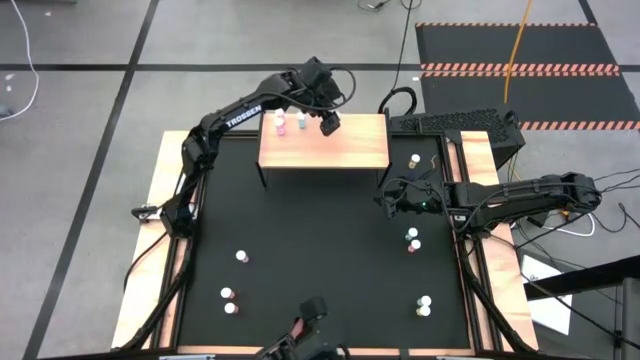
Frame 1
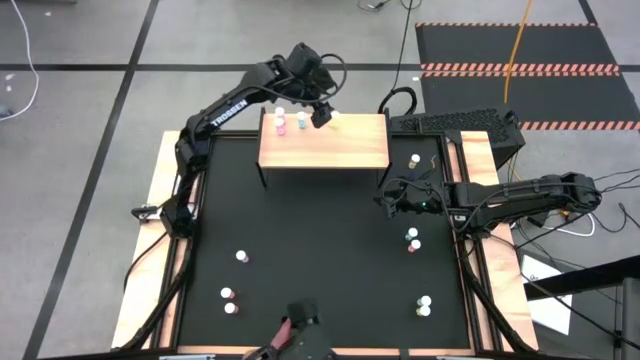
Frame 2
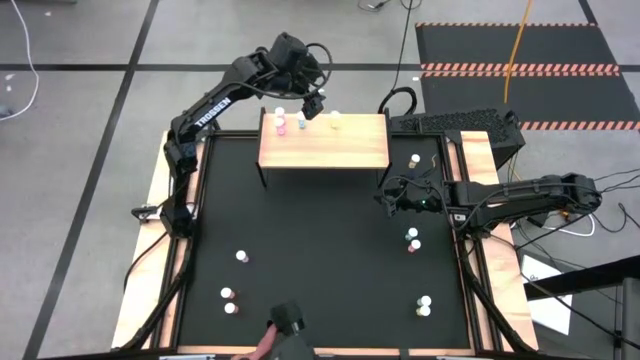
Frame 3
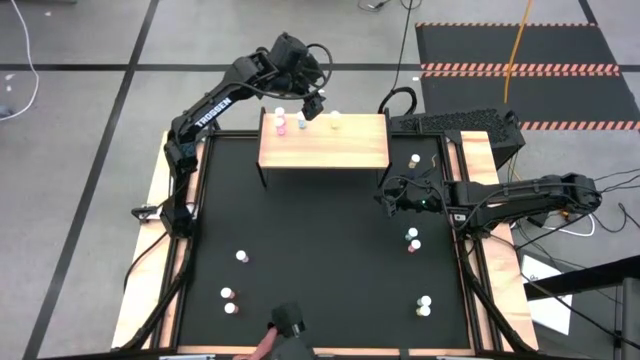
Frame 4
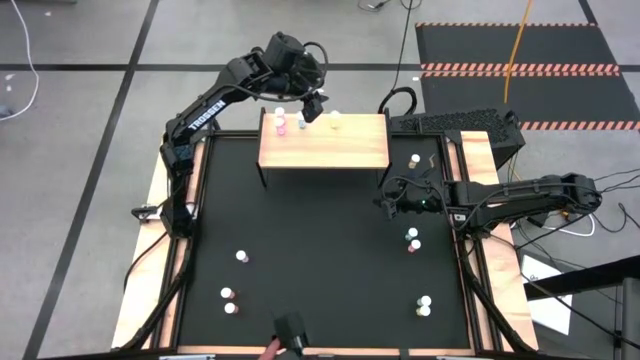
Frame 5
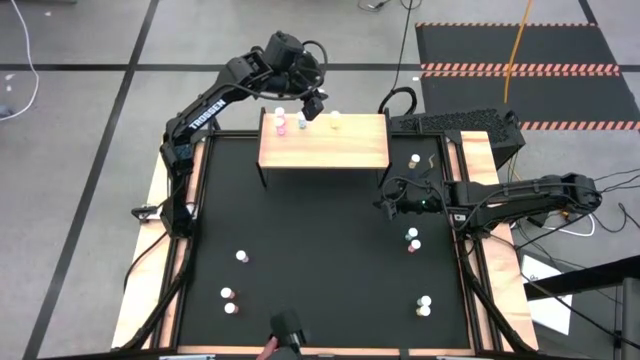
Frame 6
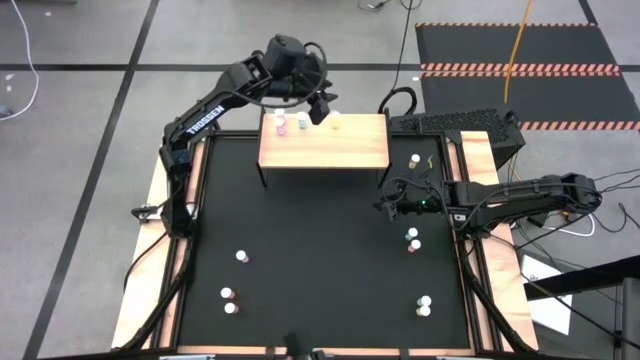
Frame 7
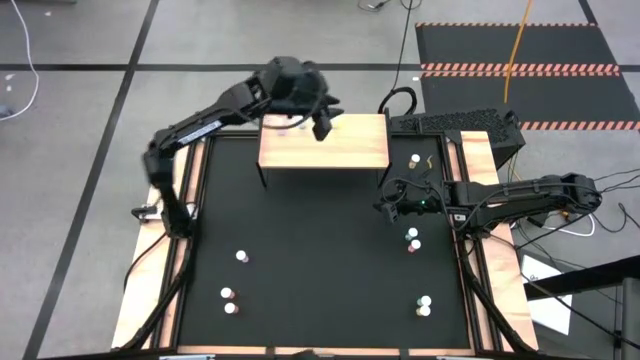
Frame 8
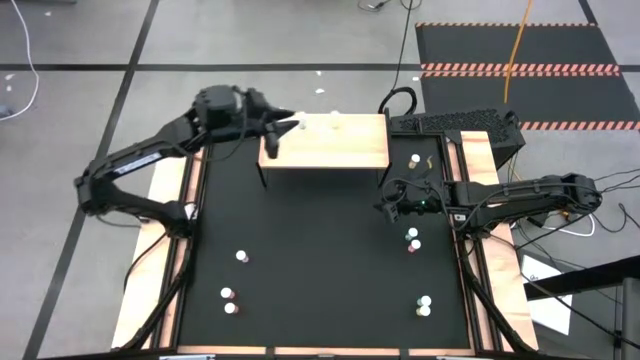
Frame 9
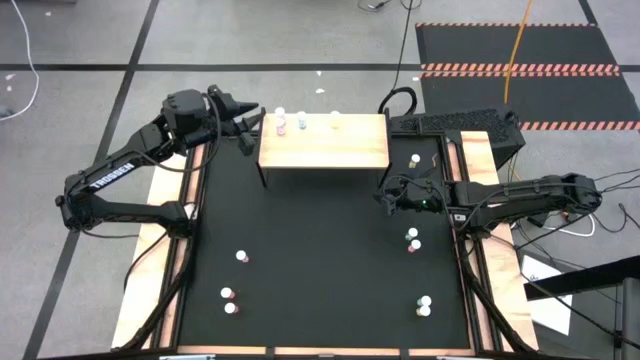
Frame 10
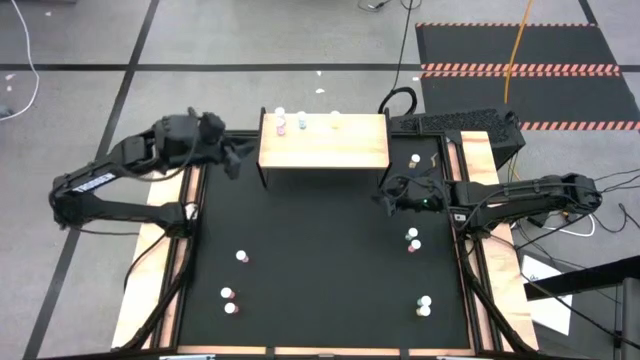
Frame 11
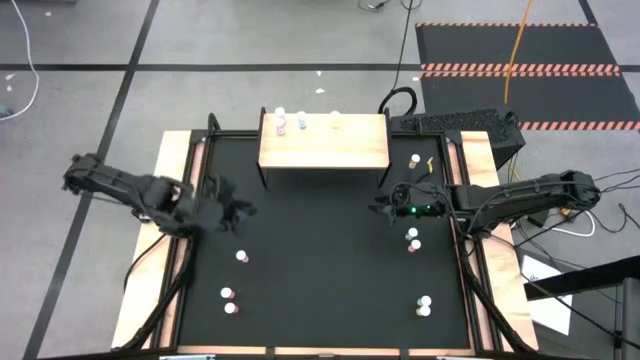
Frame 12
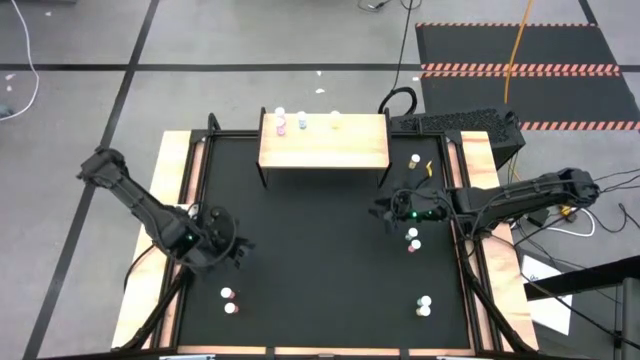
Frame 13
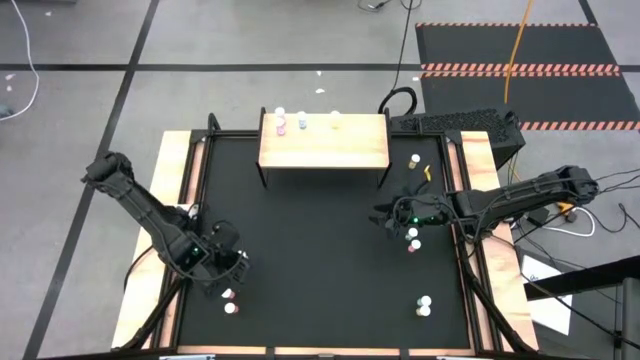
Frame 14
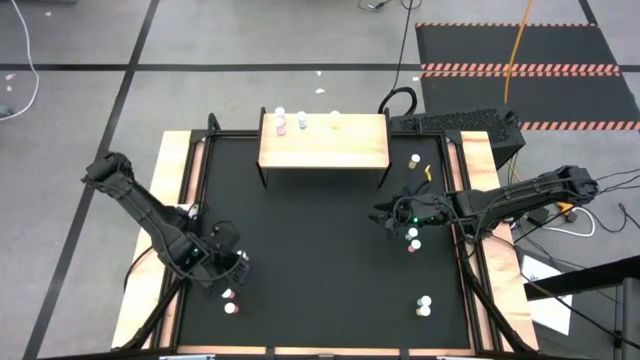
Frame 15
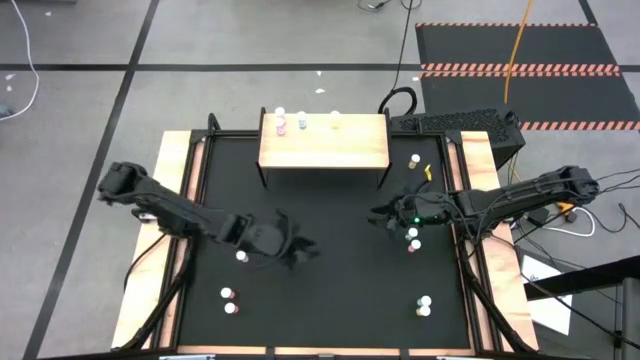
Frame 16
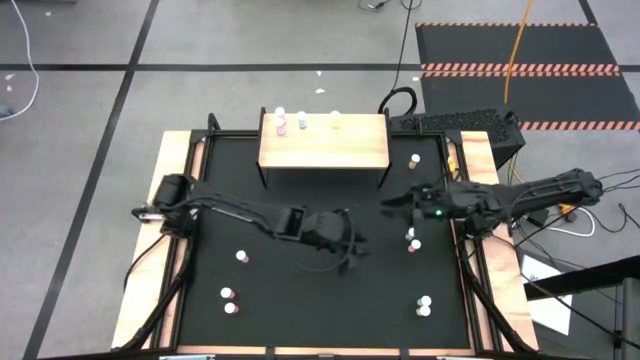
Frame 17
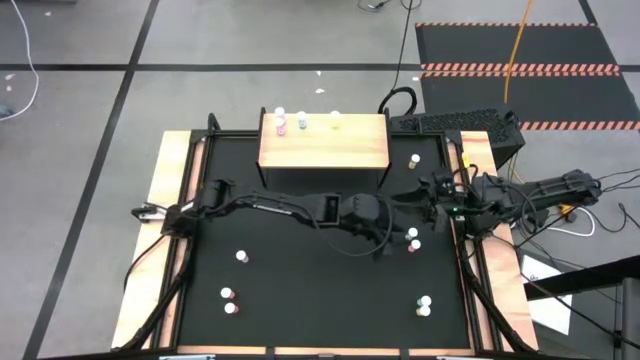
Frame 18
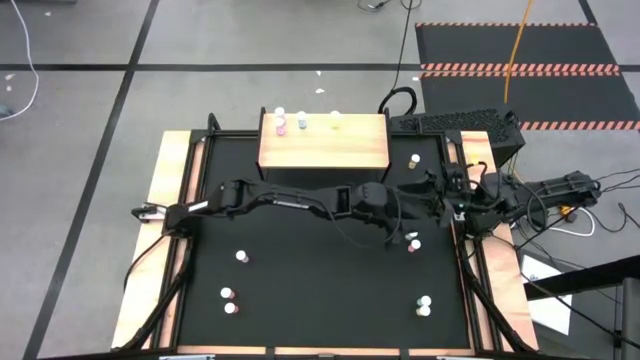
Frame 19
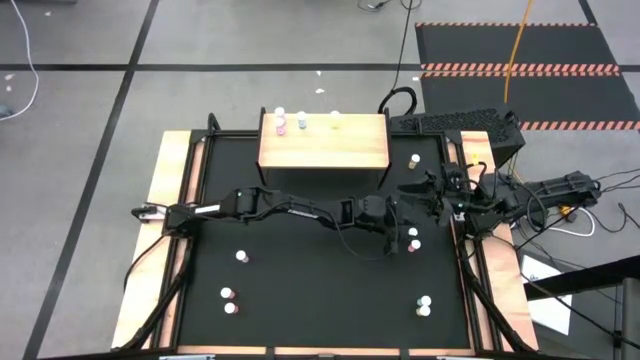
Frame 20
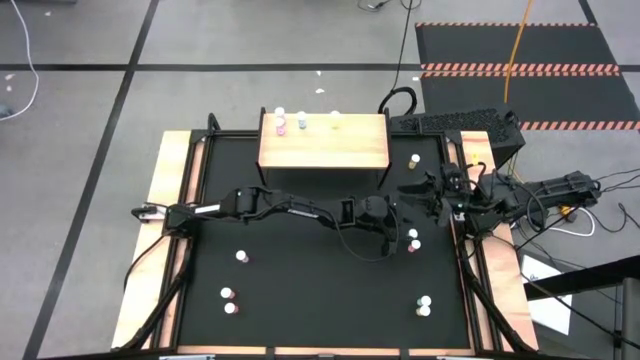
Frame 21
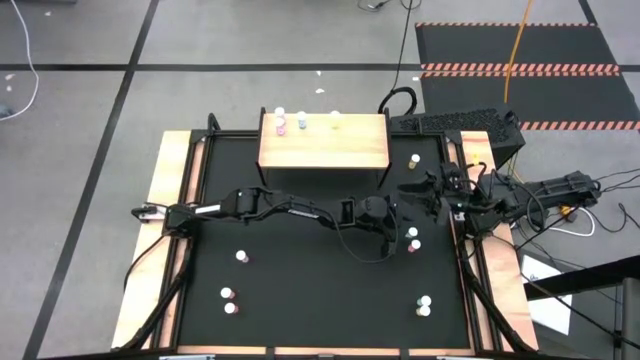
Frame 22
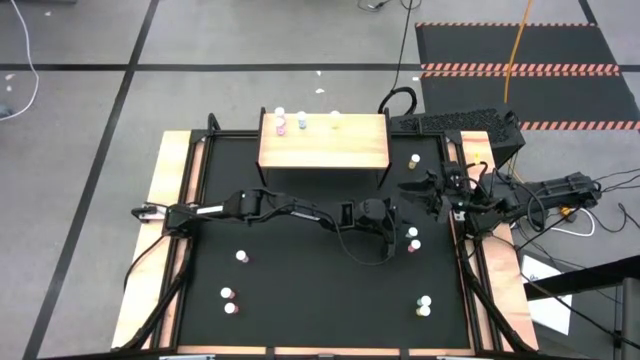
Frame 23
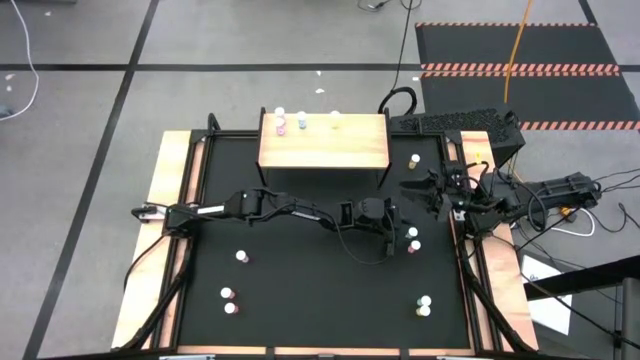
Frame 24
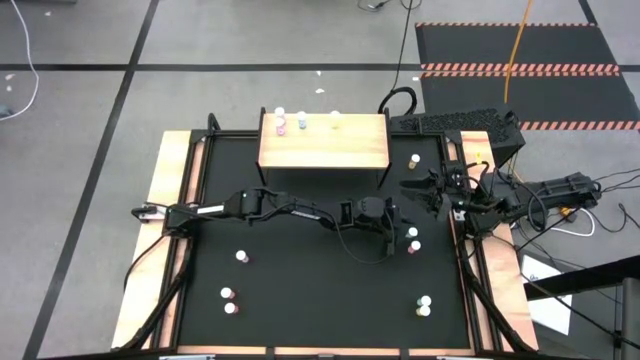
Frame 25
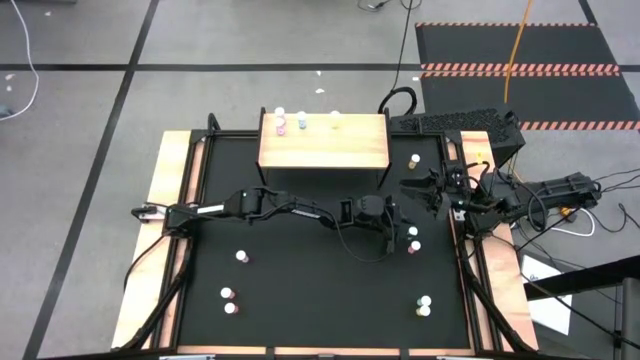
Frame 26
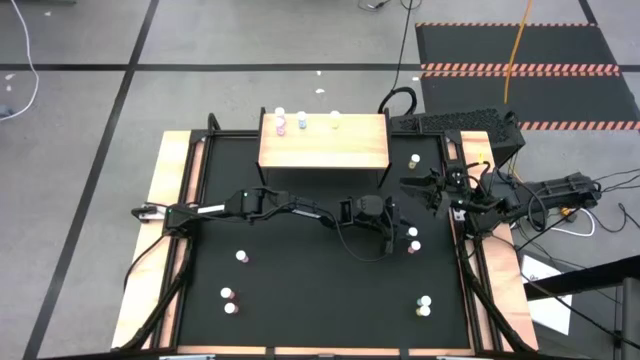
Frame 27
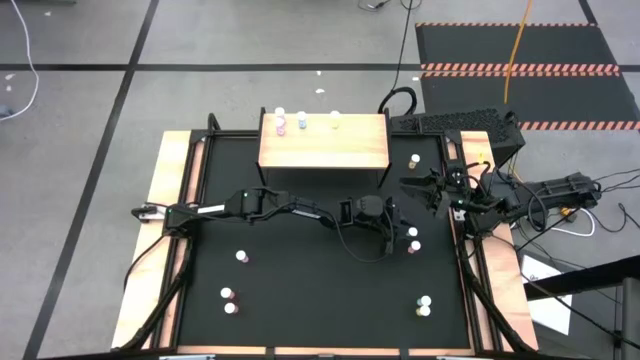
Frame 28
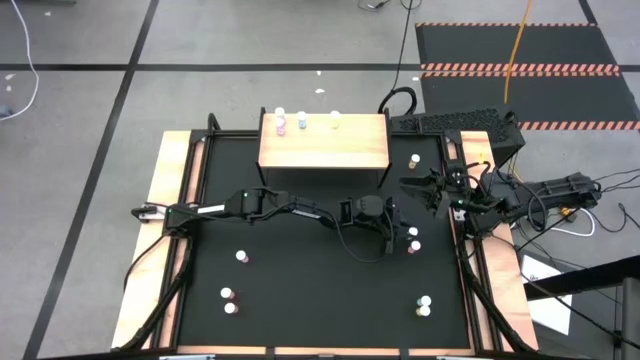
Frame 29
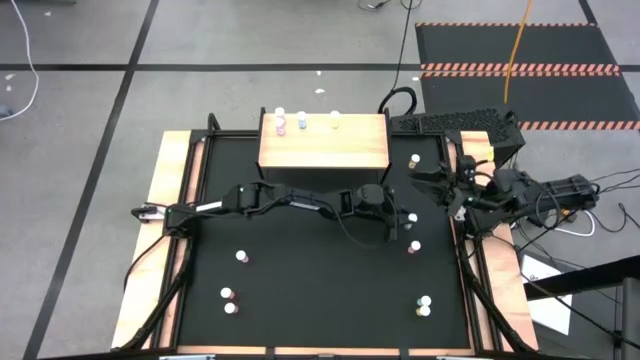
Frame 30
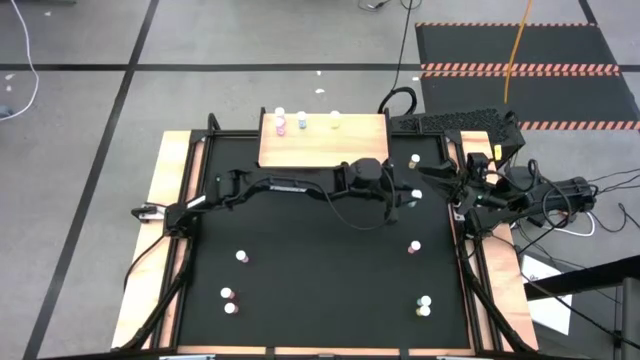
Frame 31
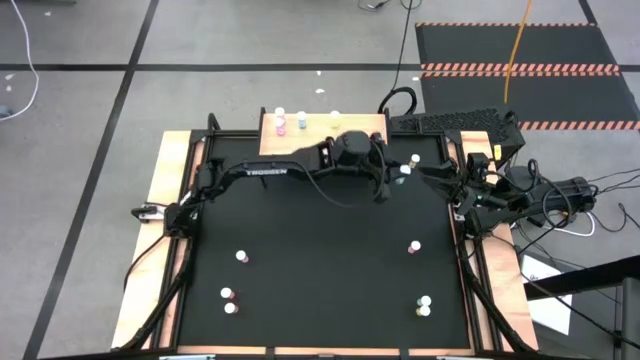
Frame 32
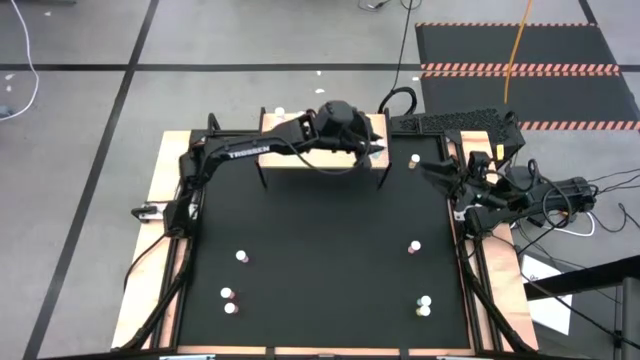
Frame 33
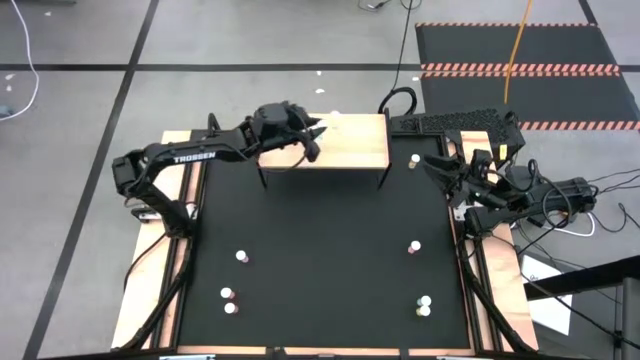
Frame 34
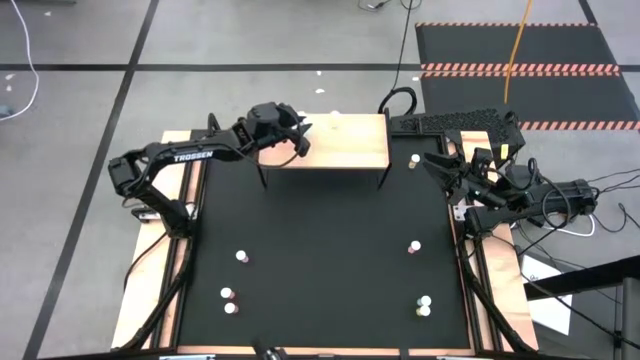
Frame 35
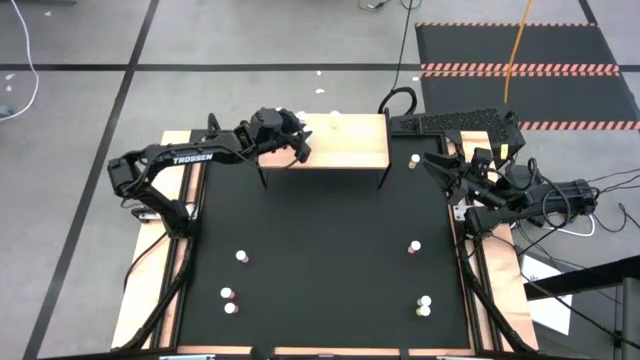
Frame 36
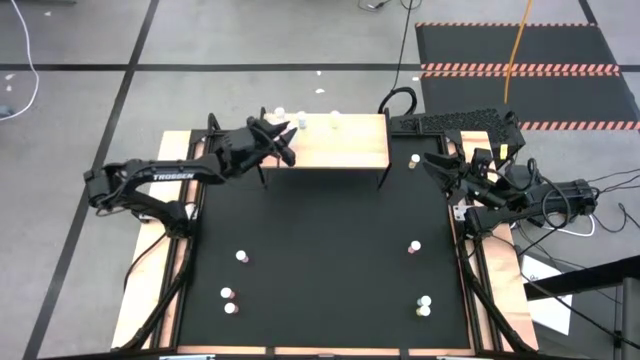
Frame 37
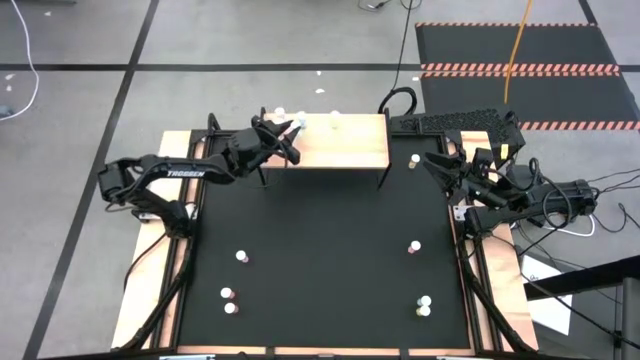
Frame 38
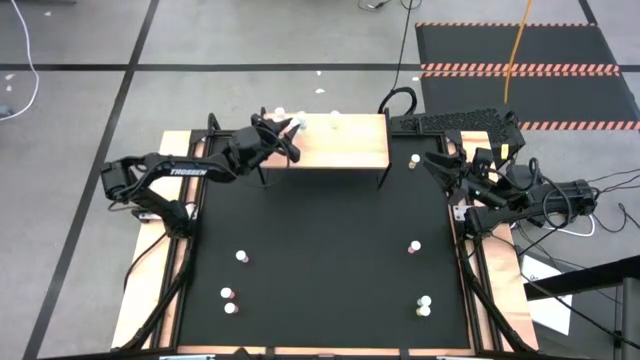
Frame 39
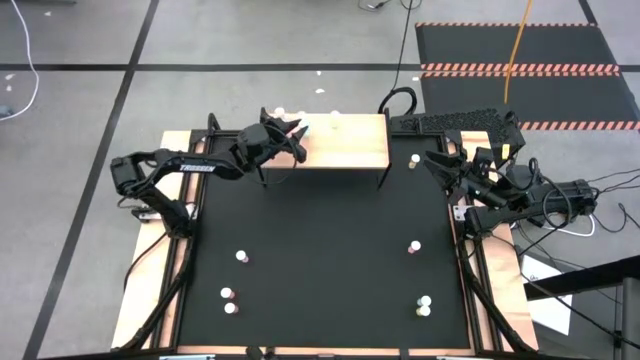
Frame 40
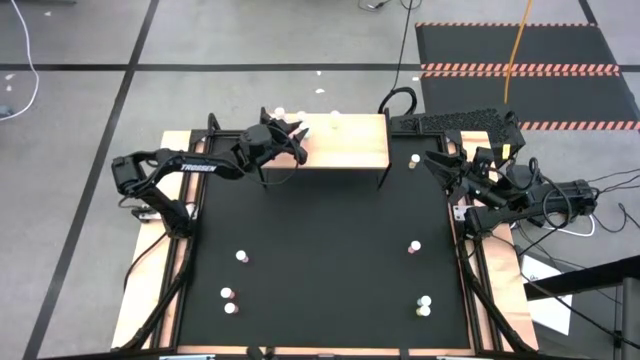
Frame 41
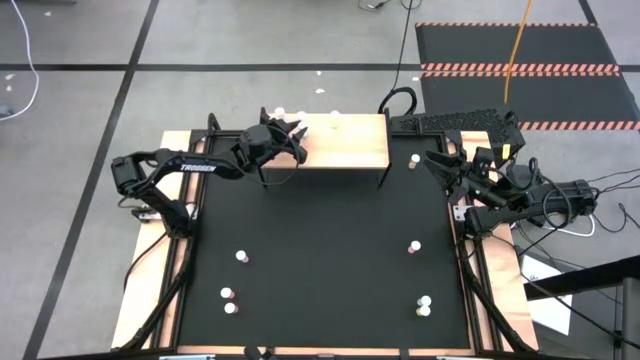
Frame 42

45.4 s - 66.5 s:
Task: Pick and place medicine bottles onto shelf by color
Put the top blue pill bottle on the shelf aligned with the other blue pill bottle
